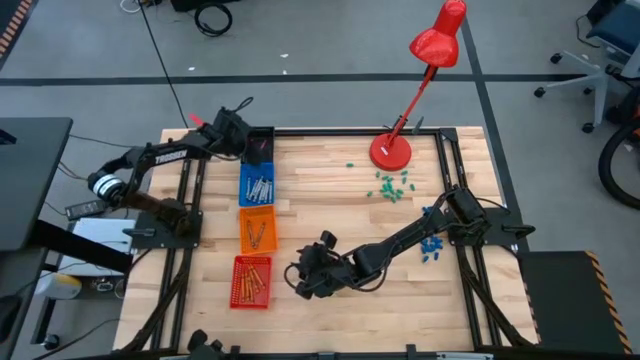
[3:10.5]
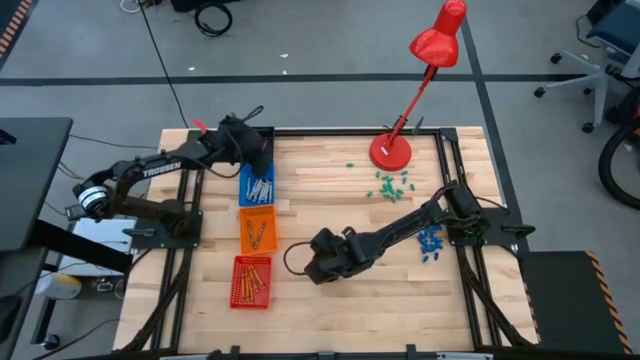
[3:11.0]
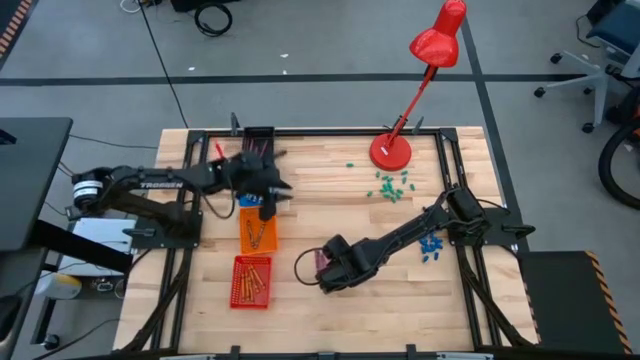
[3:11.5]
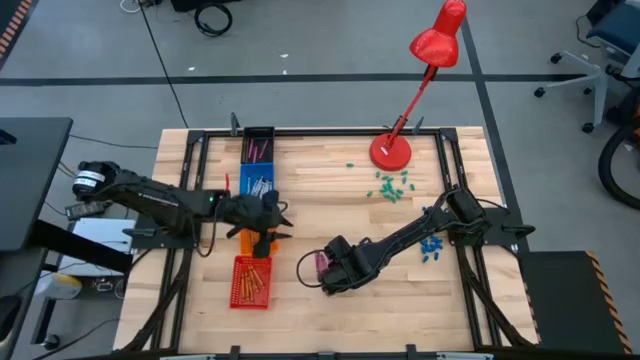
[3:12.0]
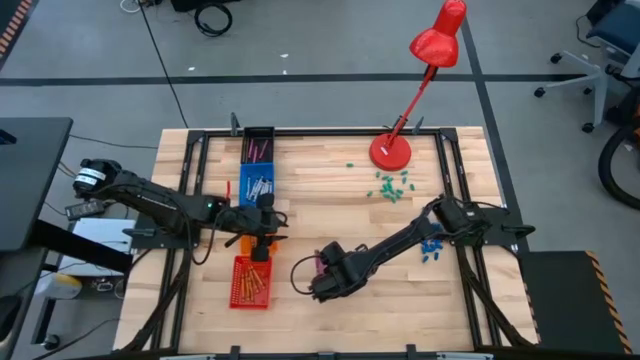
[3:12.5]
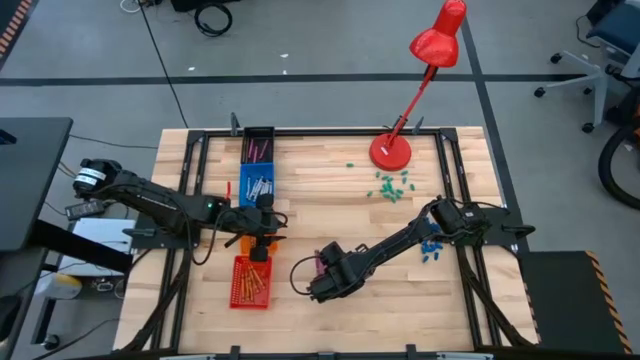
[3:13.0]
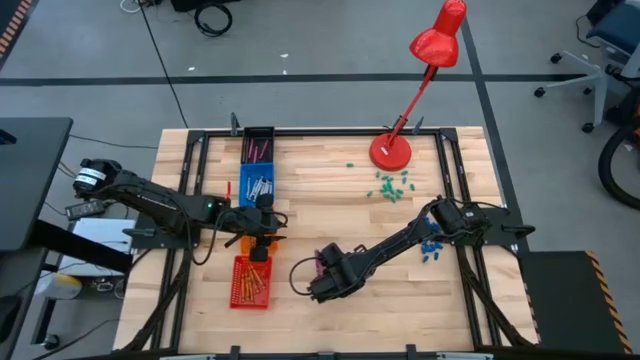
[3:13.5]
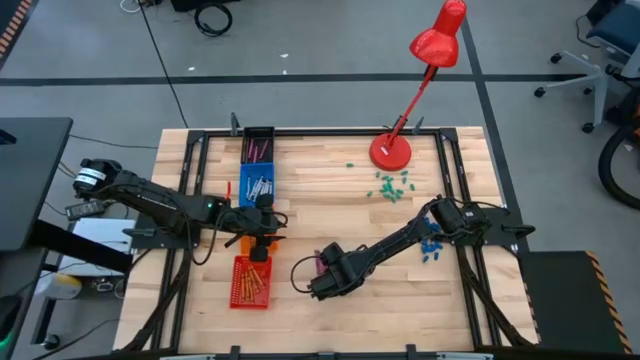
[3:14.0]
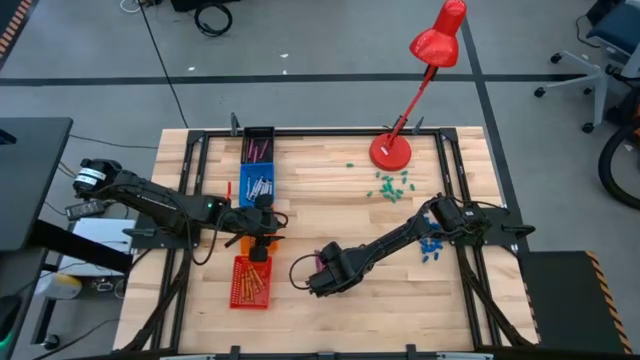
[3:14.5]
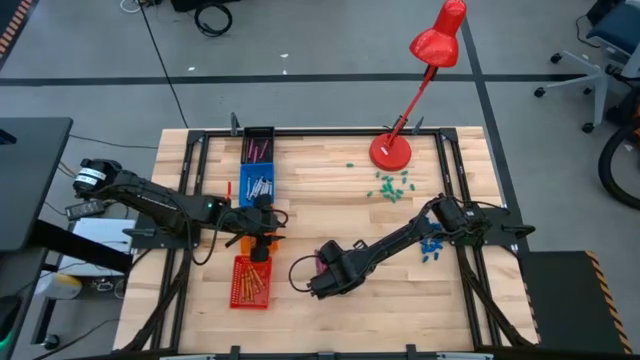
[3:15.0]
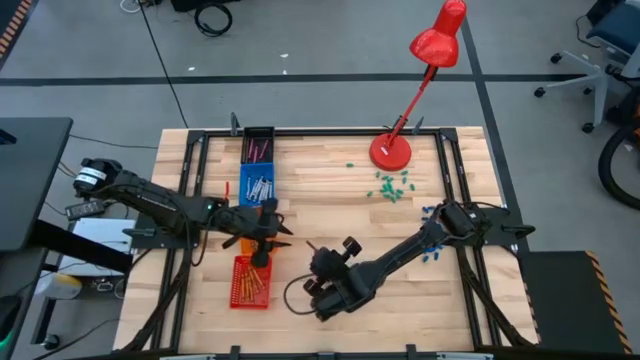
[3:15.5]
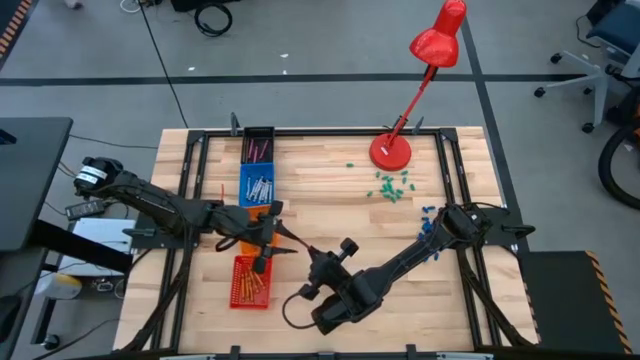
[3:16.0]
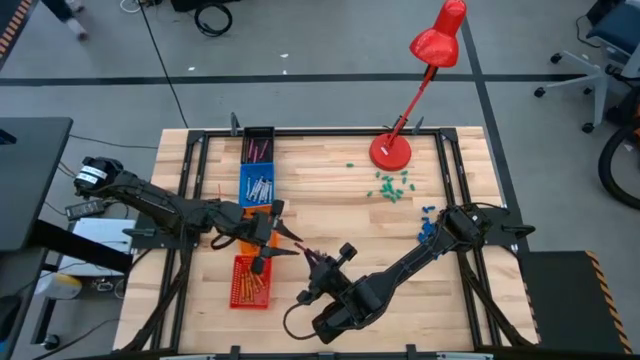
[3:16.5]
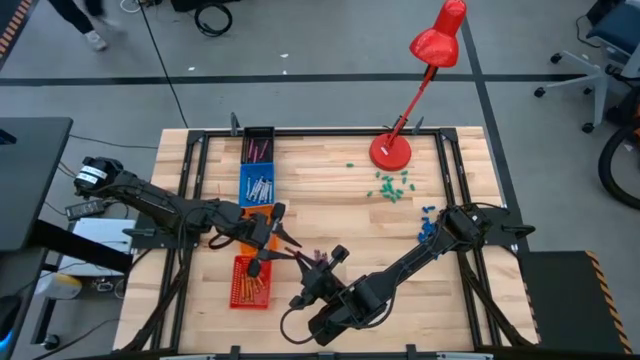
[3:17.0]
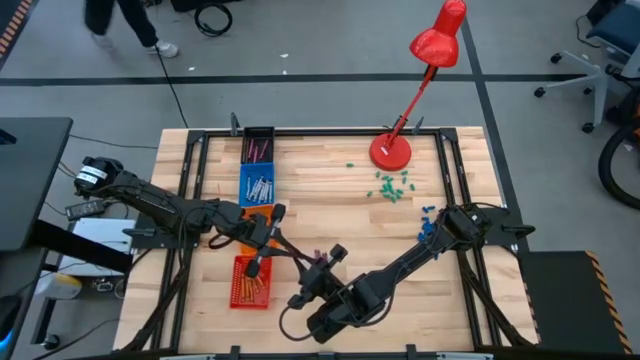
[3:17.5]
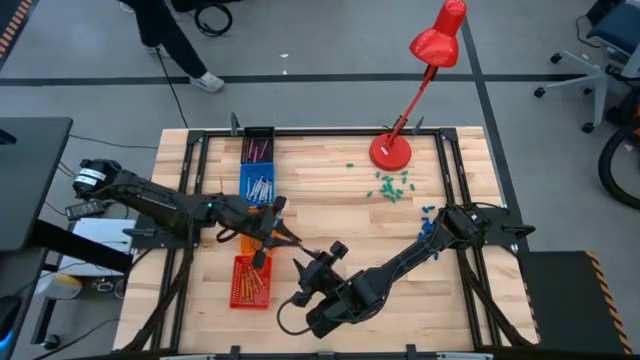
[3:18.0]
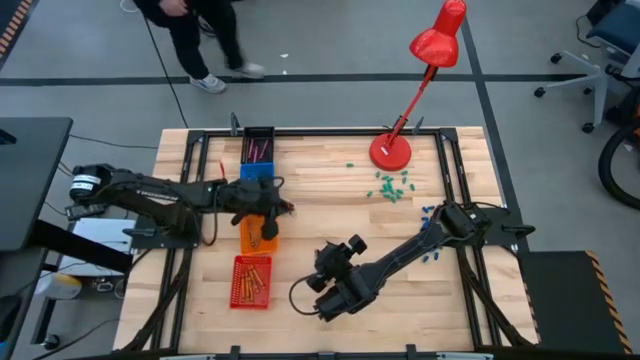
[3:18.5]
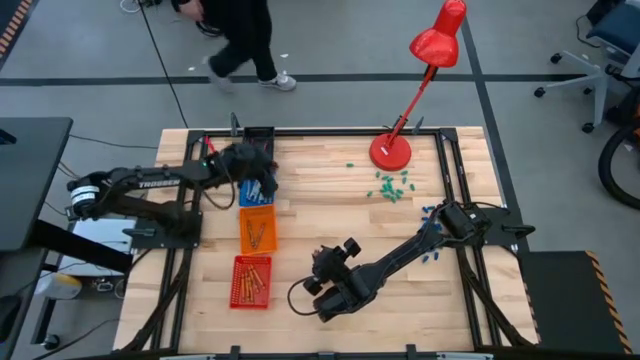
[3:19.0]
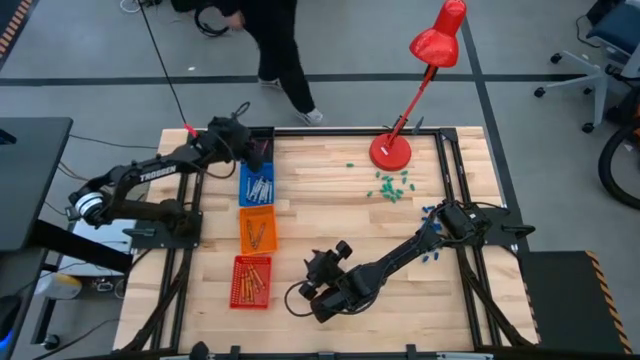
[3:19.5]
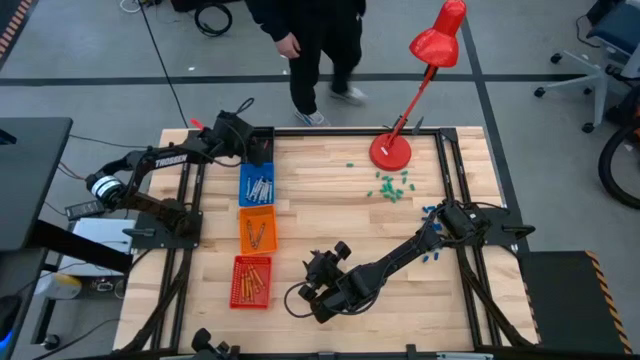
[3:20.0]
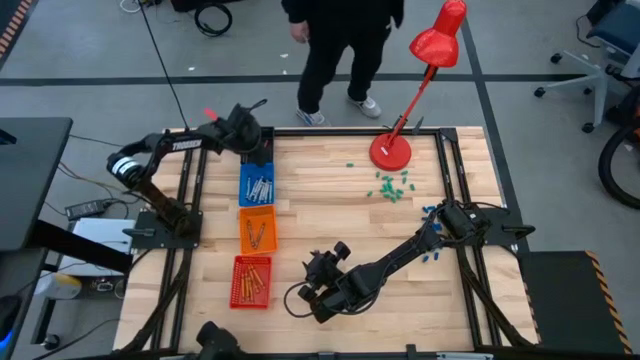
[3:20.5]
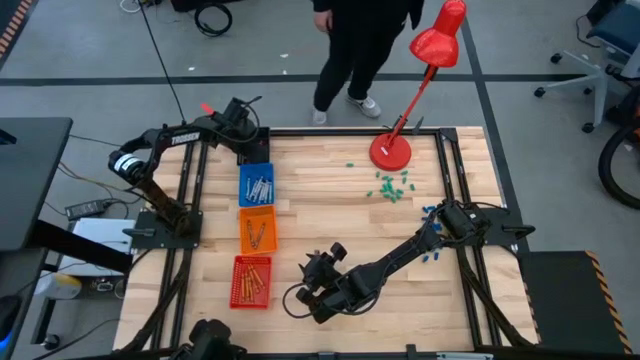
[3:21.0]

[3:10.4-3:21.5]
Task: Sort crayons
Put the pink crayon into the black bin

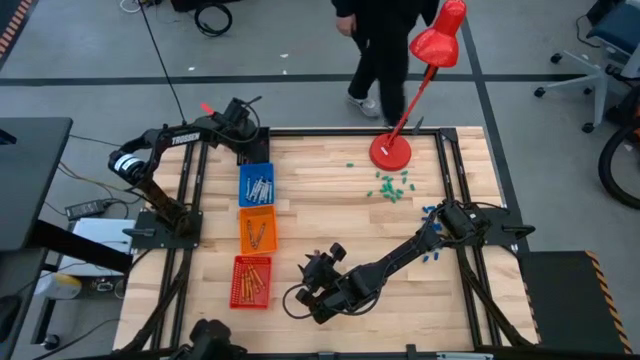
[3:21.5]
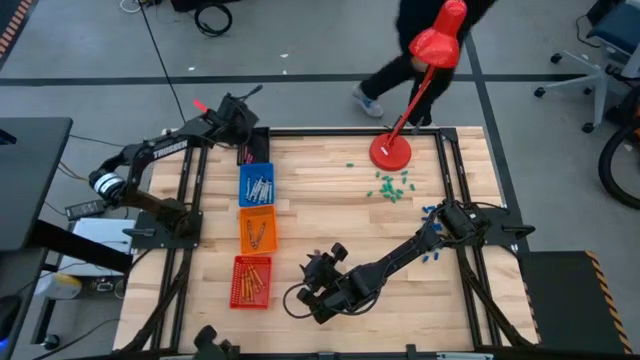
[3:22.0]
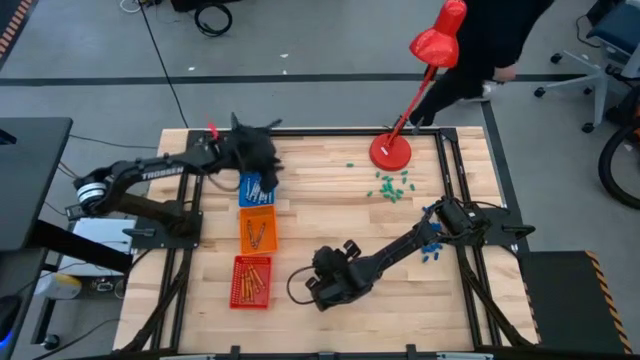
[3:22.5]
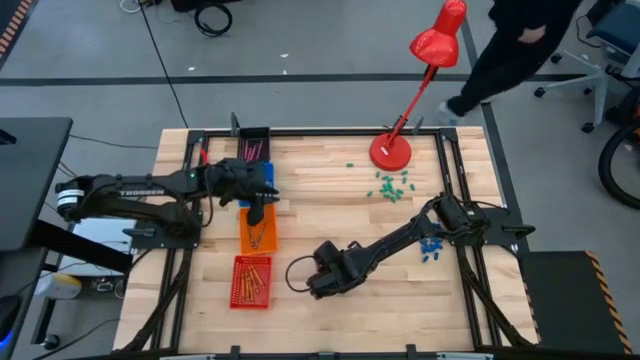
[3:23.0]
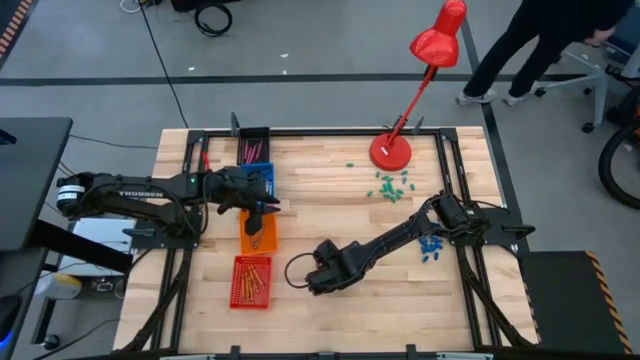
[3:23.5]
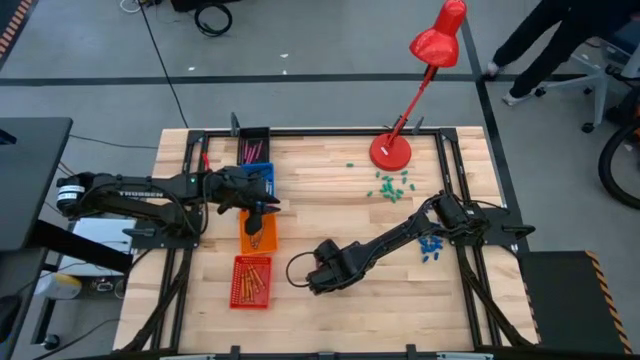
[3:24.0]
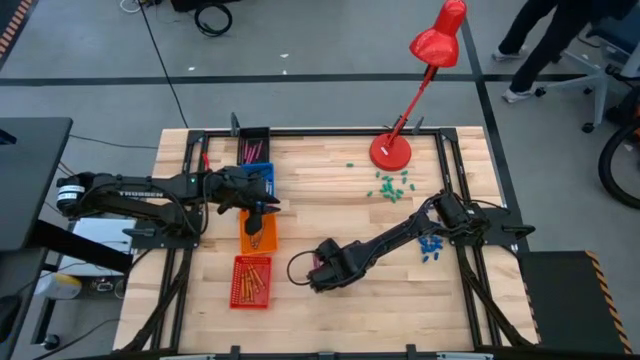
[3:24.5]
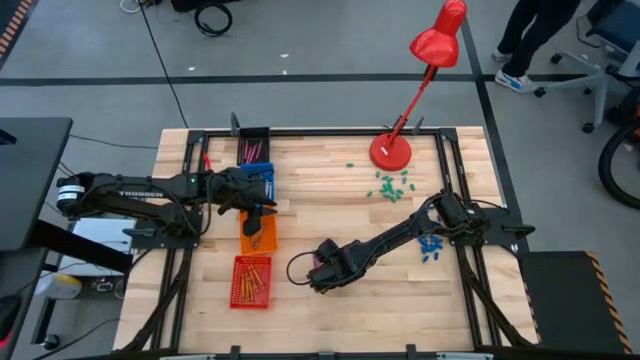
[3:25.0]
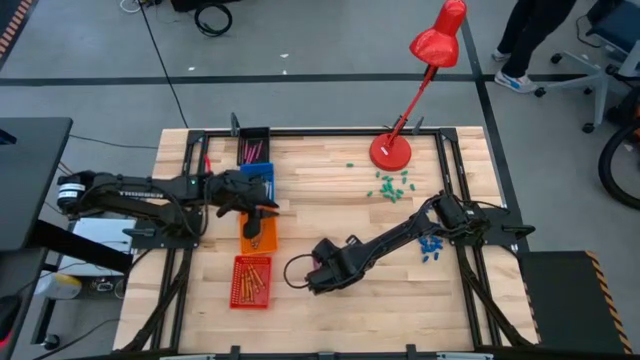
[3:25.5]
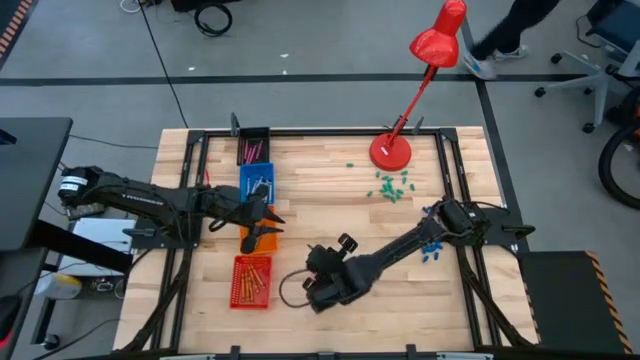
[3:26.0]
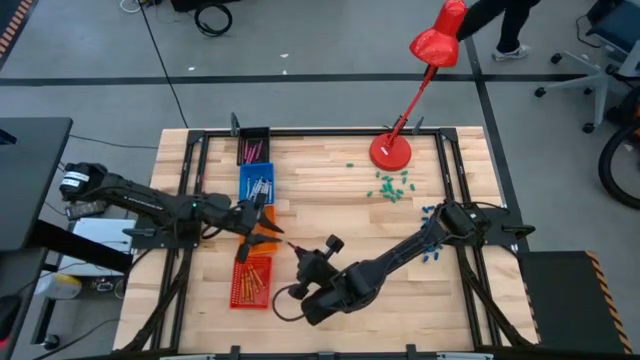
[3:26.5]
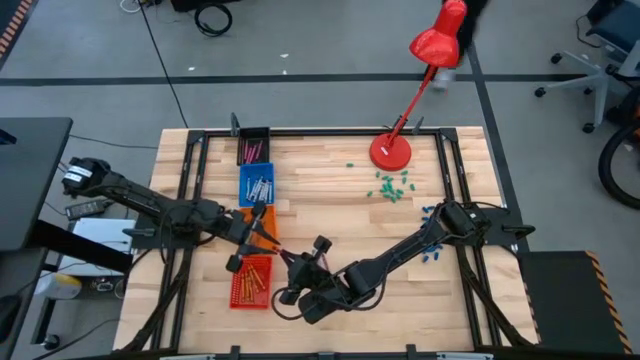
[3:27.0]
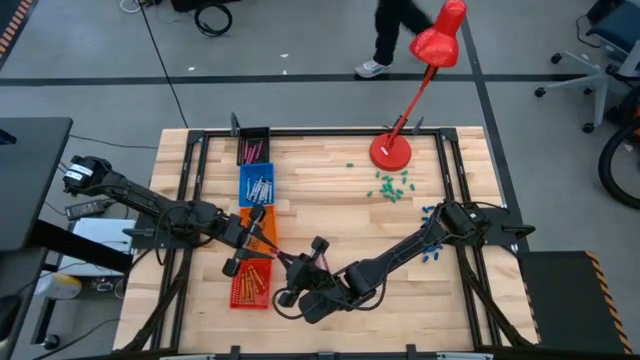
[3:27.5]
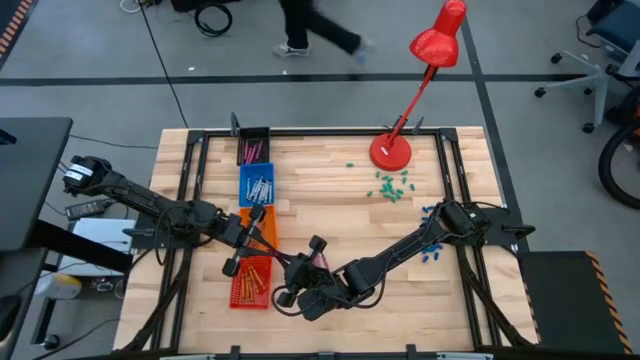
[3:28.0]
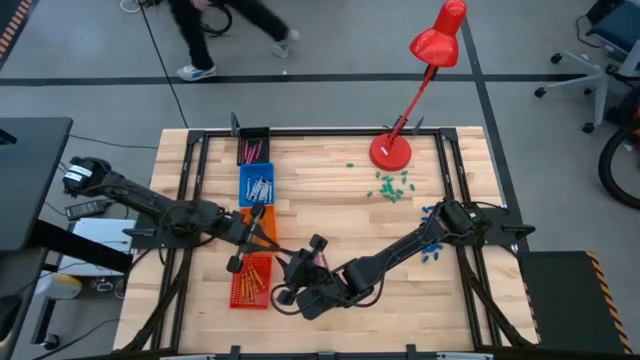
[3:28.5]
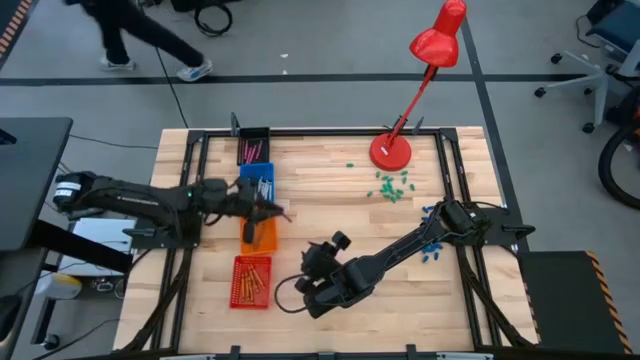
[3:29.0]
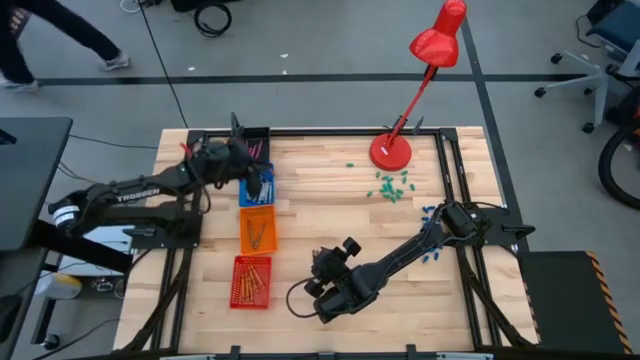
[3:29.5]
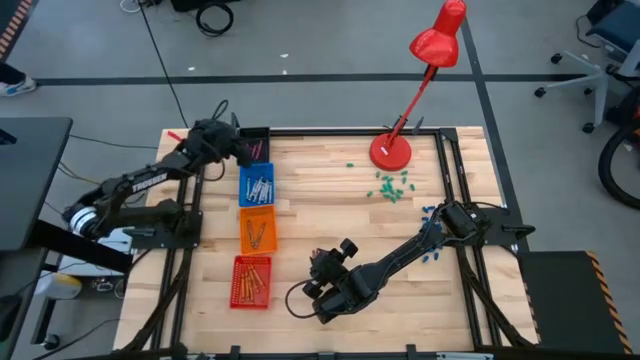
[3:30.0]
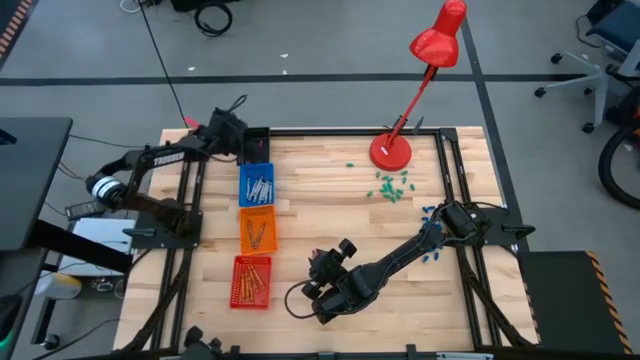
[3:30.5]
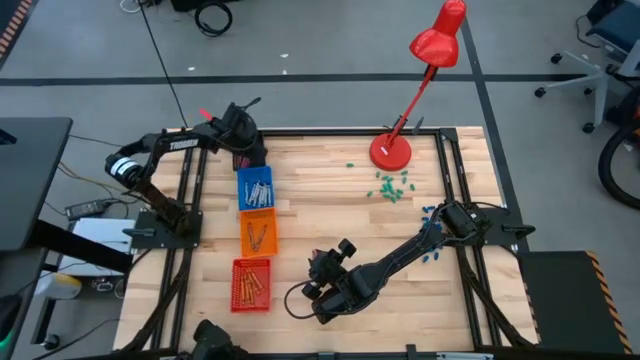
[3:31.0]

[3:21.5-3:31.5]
Put the pink crayon into the black bin
